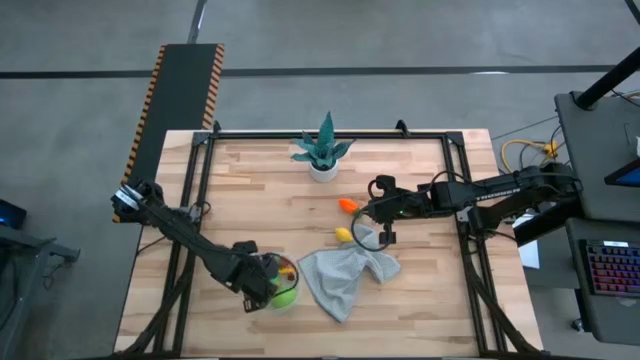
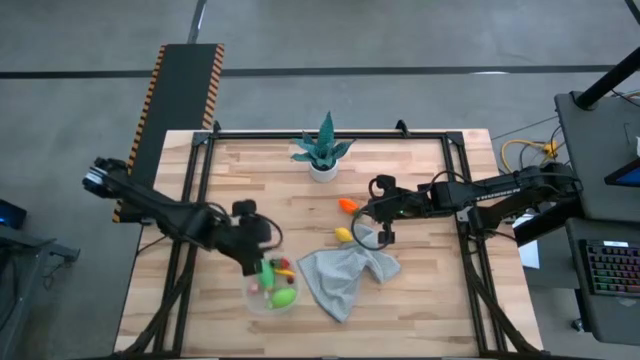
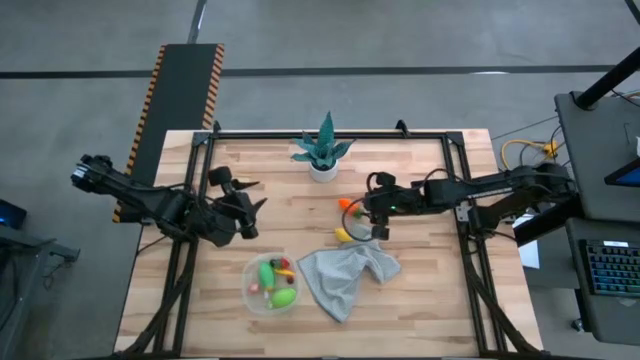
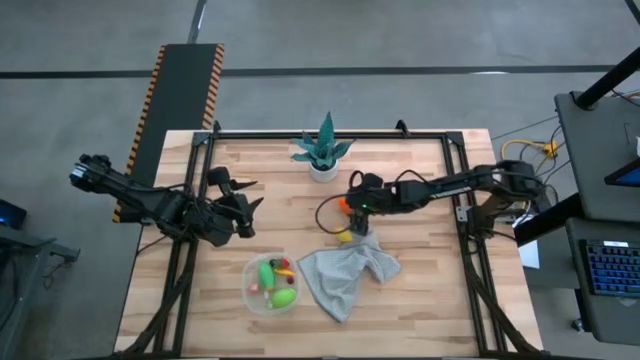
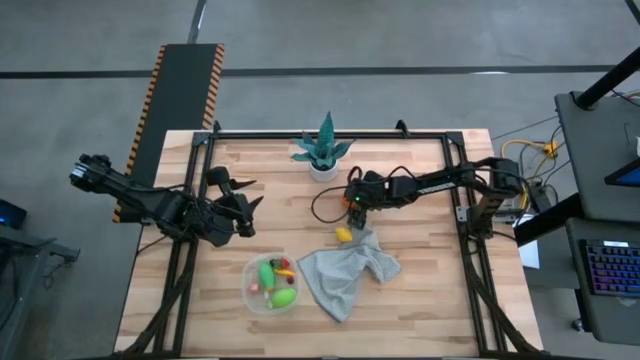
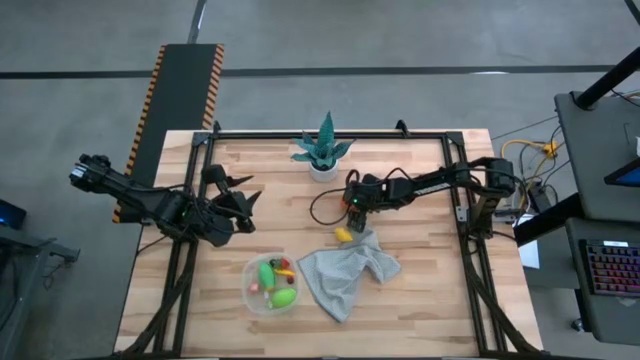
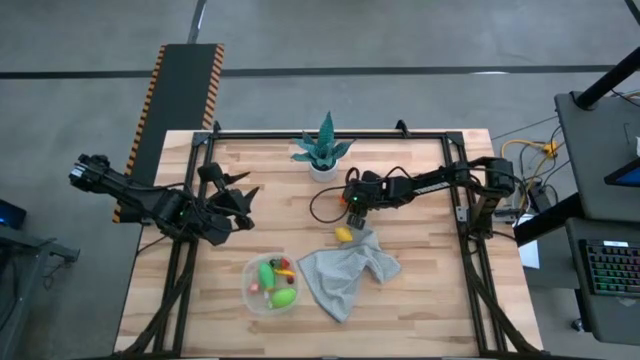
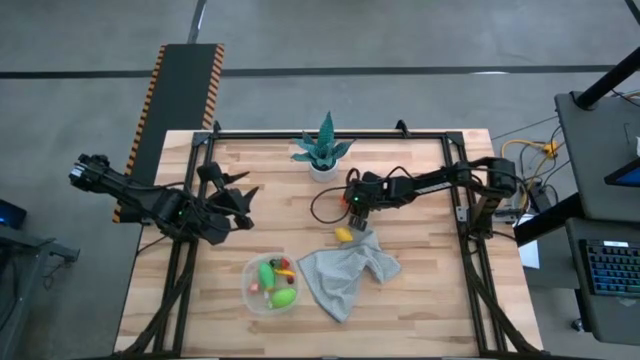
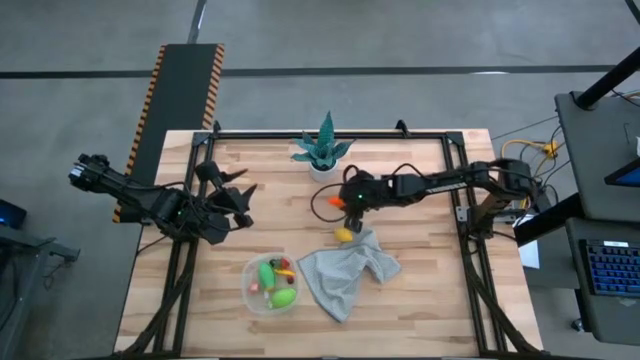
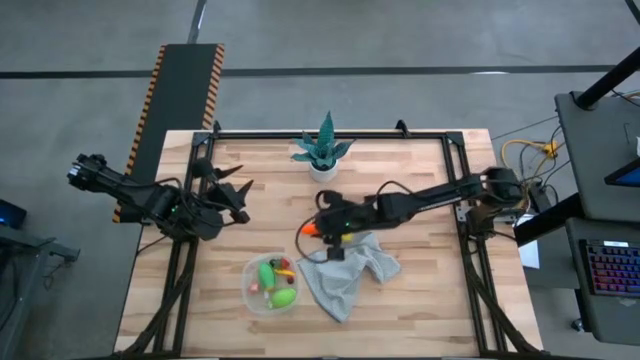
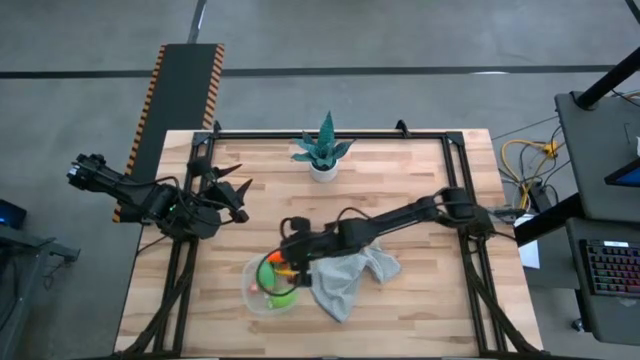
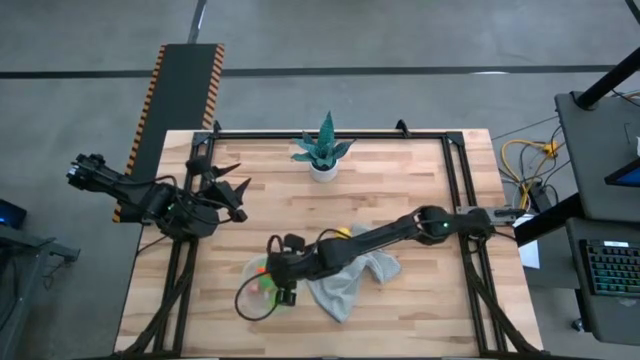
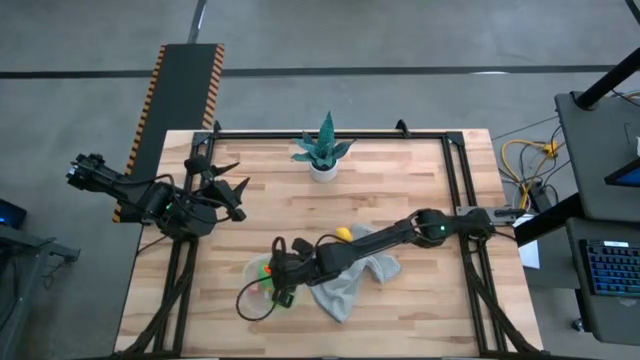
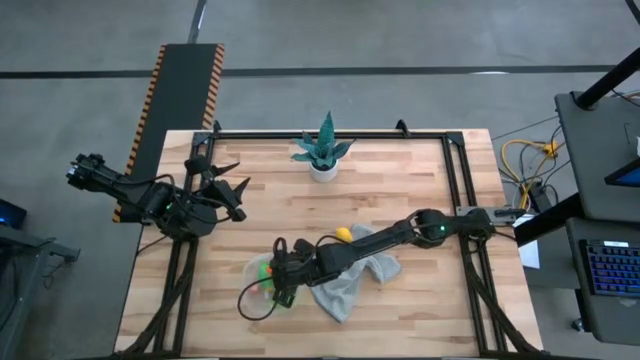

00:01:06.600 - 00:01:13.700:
Task: Pick and placing Produce into tupperware
Put the orange carrot in the transparent bin

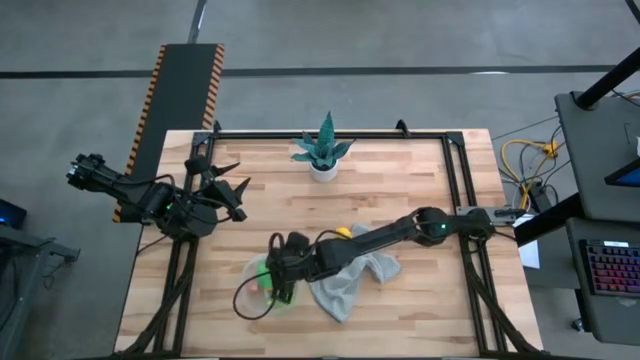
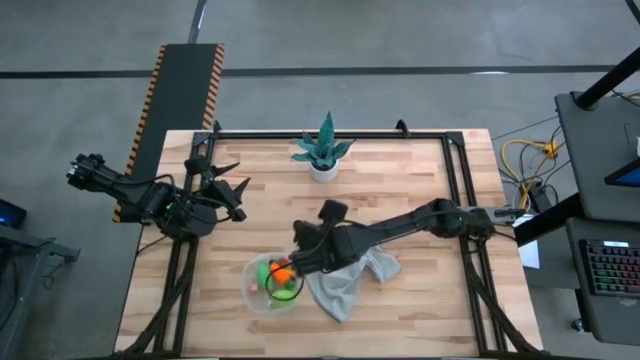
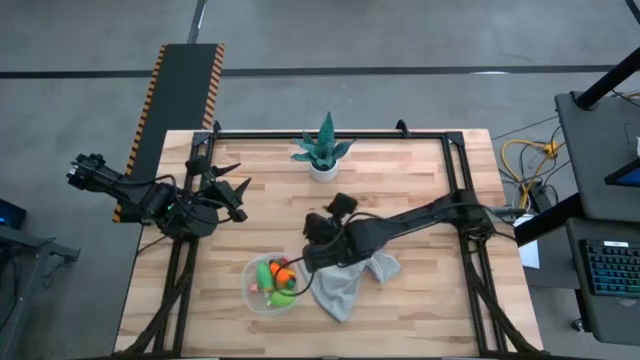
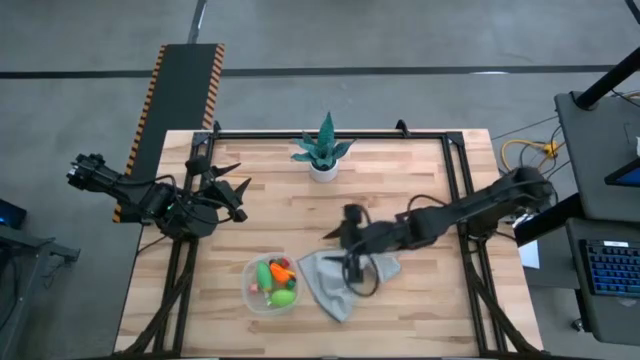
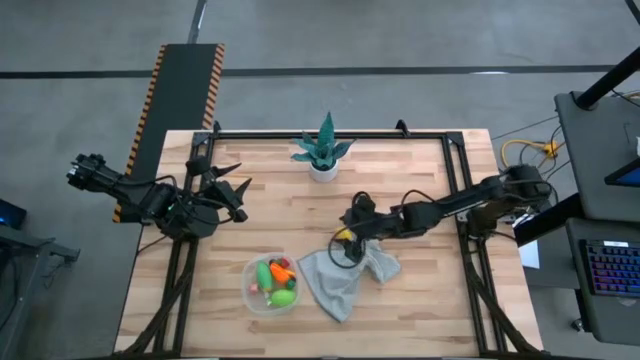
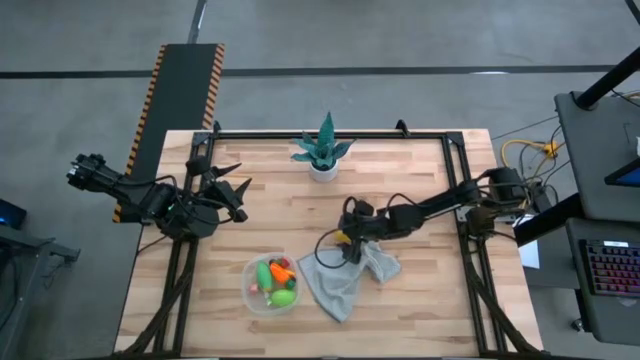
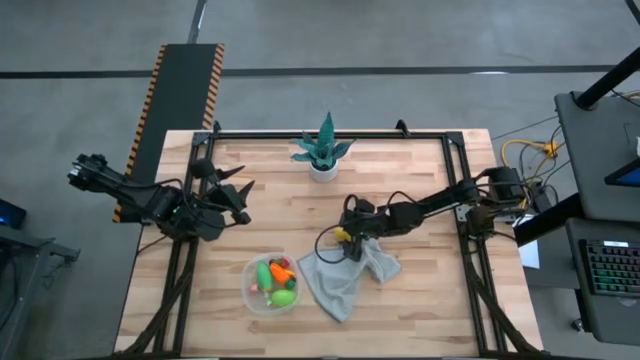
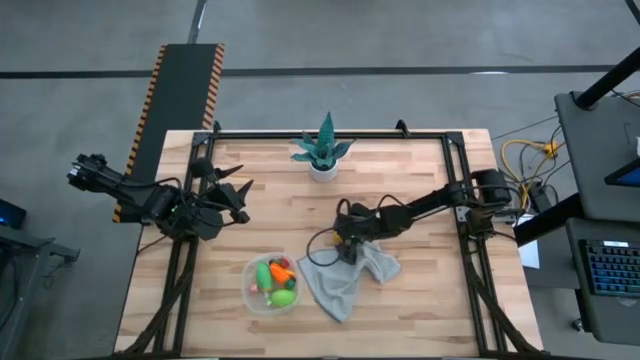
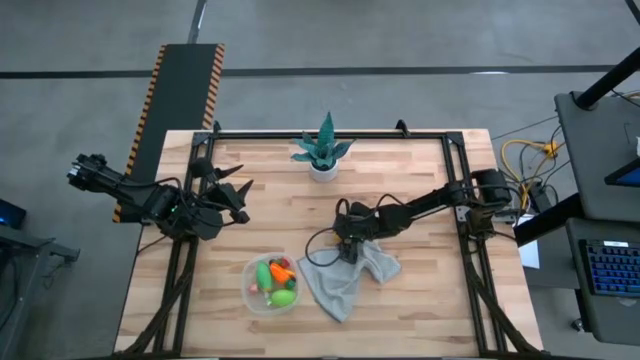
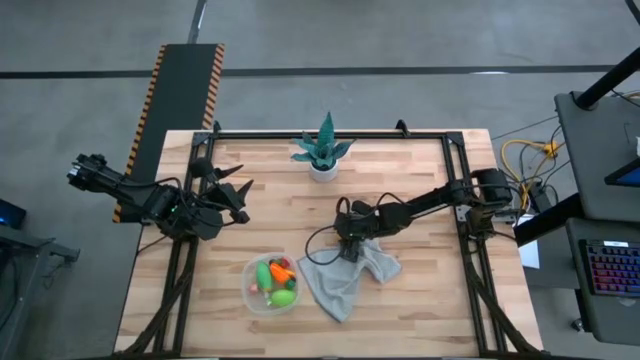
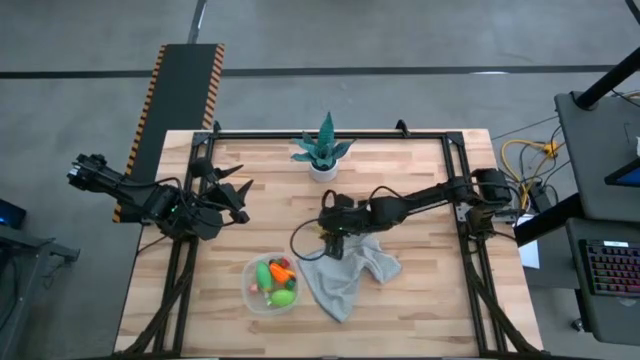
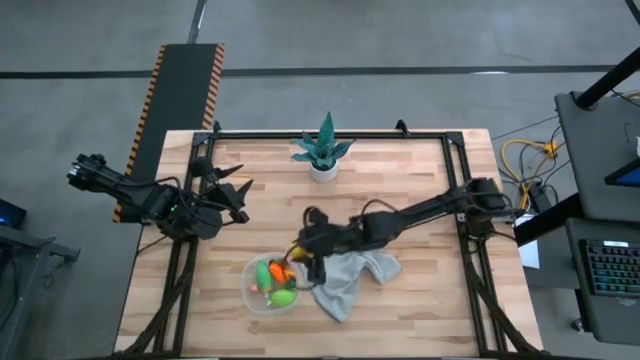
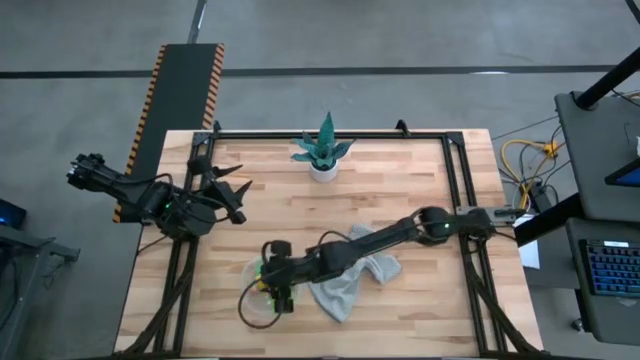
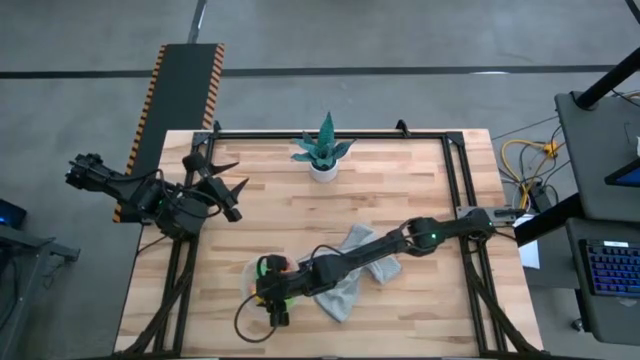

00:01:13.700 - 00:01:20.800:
Put the yellow lemon in the transparent bin

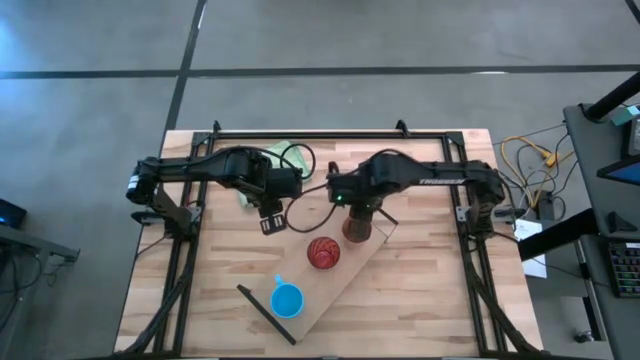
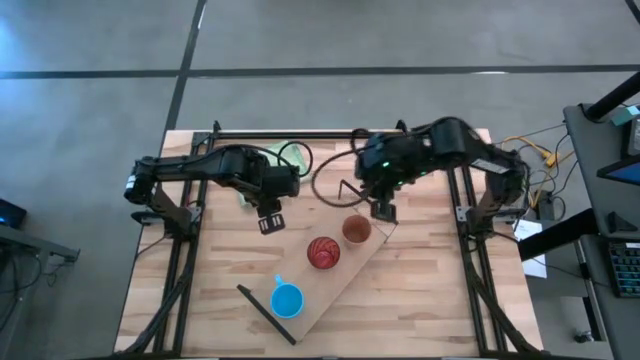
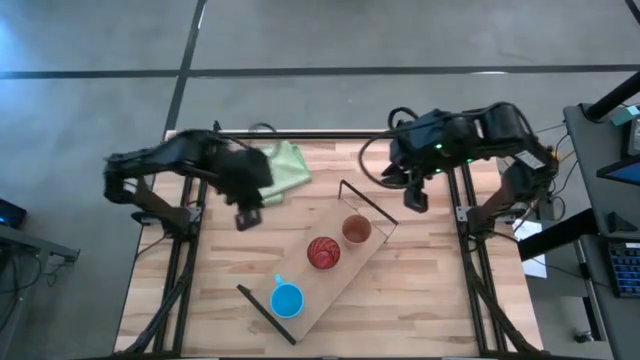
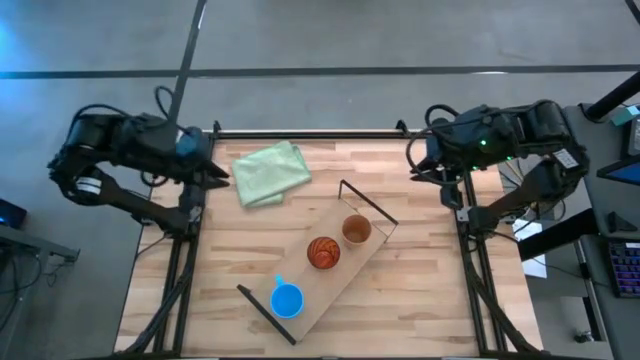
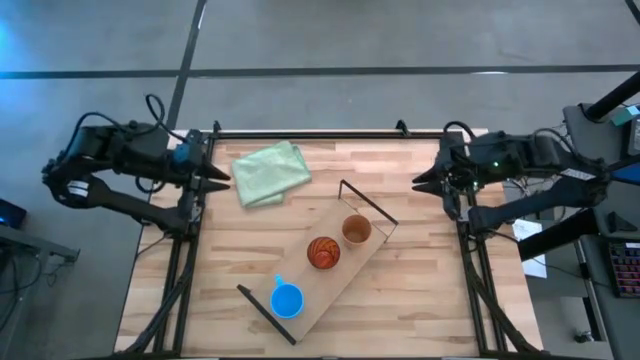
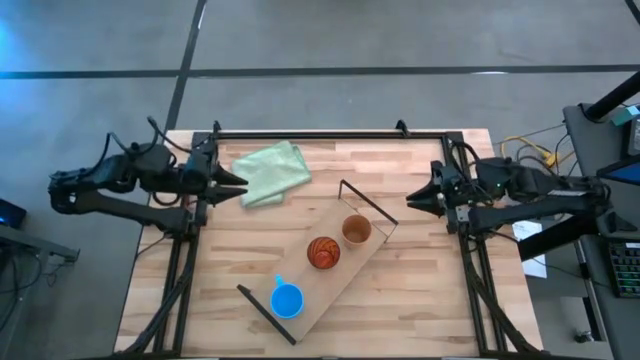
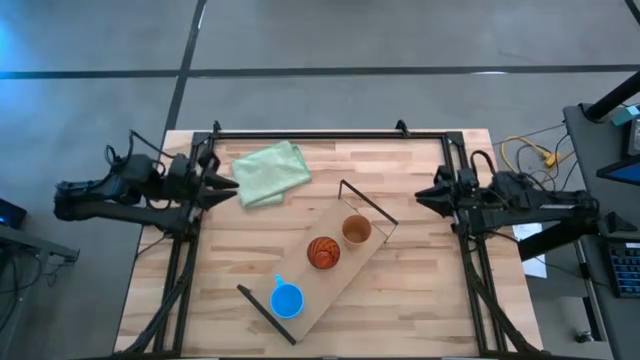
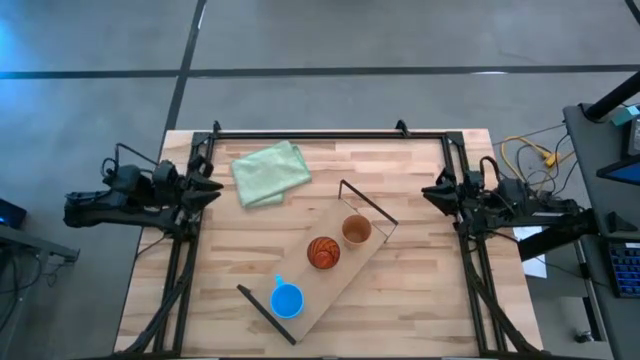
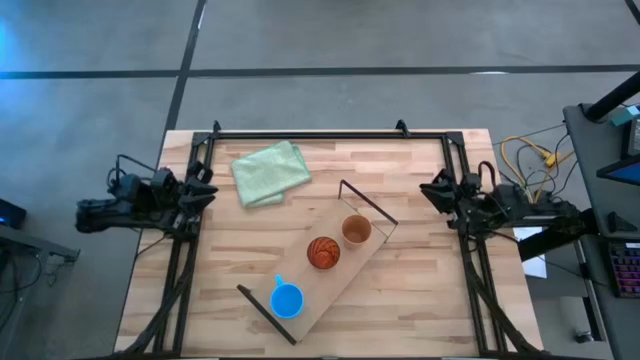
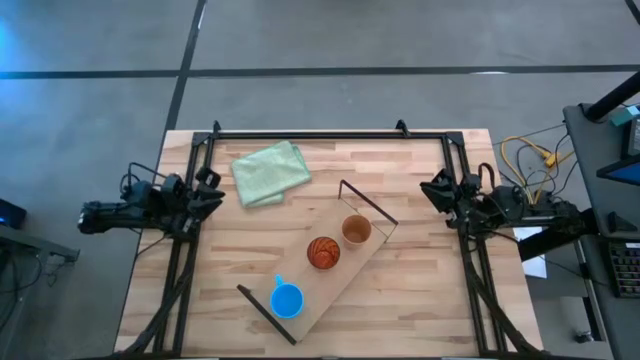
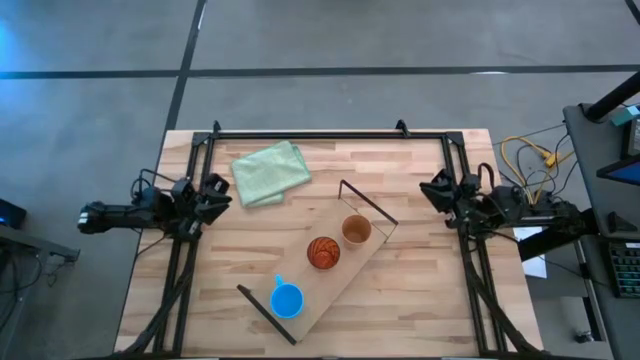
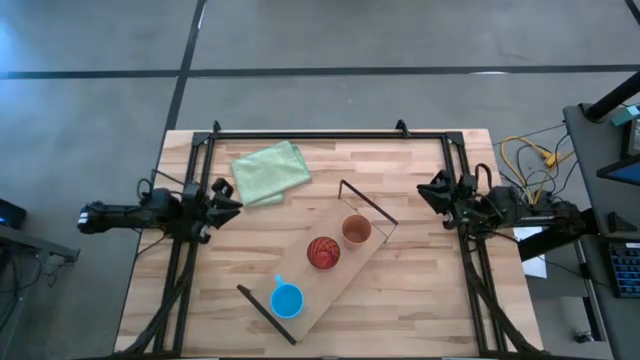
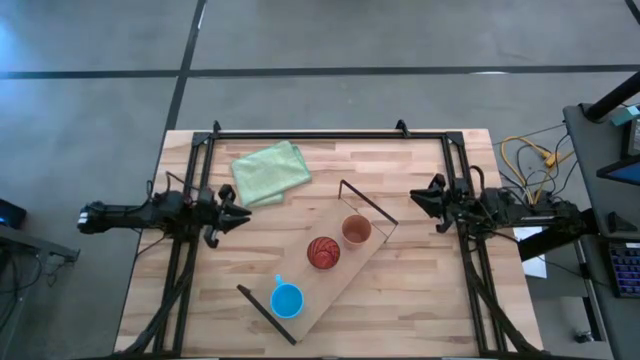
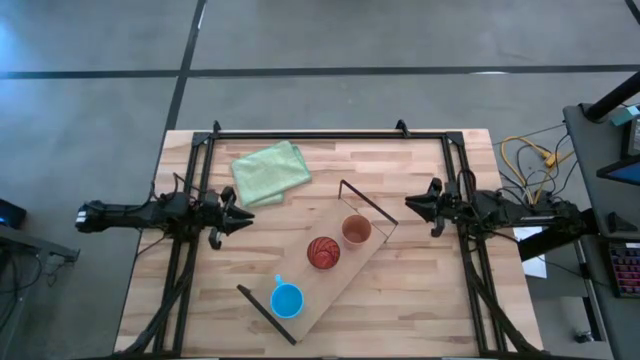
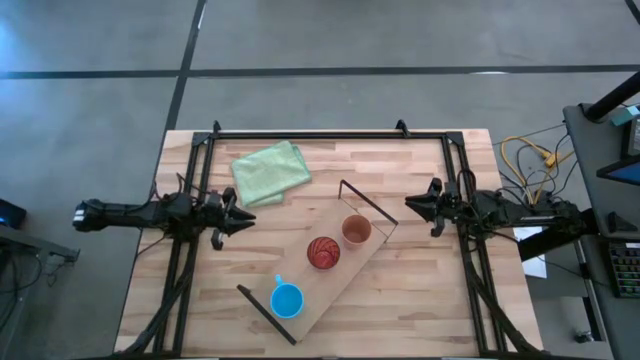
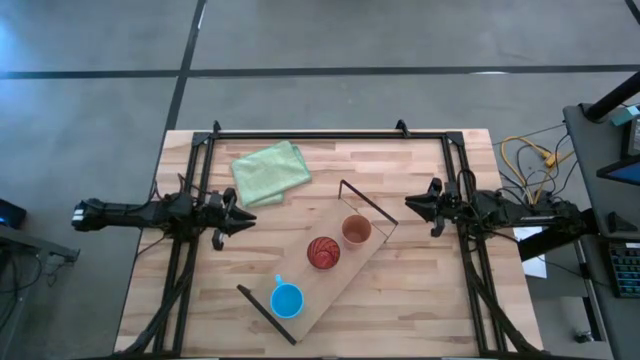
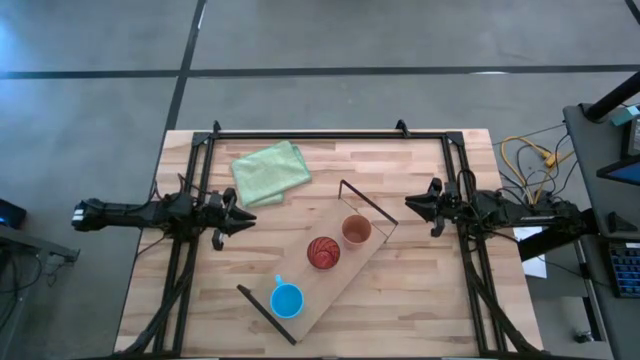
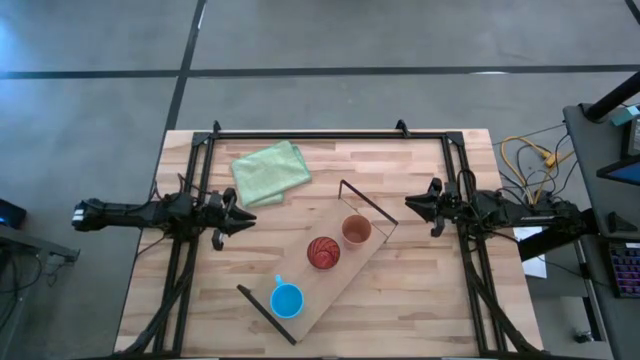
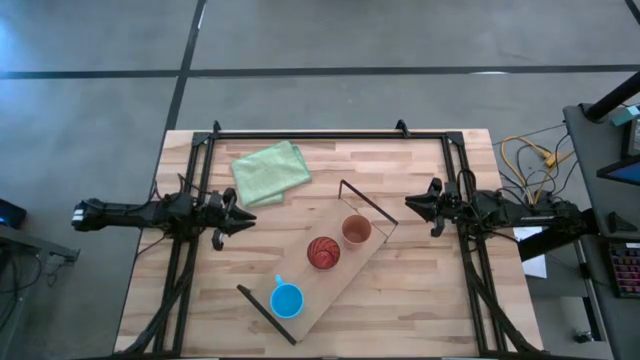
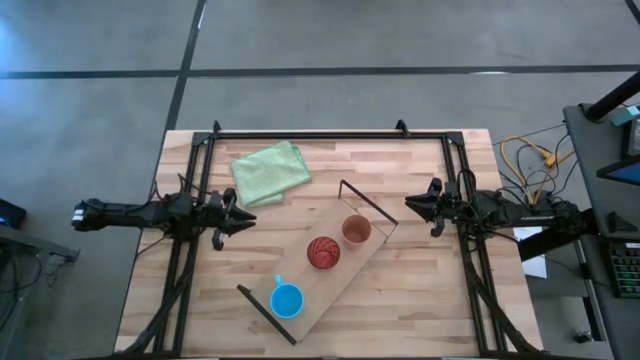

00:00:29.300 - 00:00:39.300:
Task: Stack small to large cups/mugs on shelf
Return to Home Position
